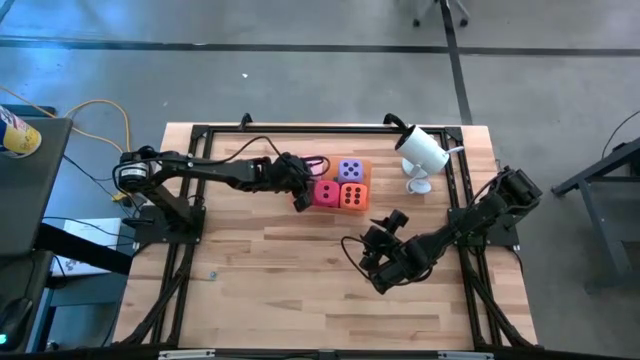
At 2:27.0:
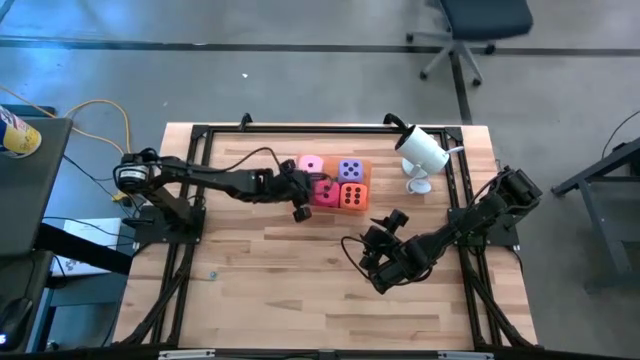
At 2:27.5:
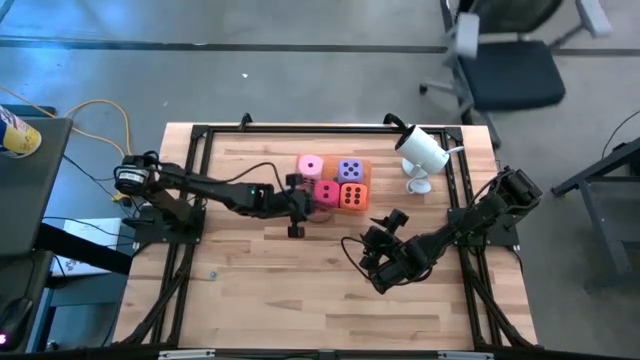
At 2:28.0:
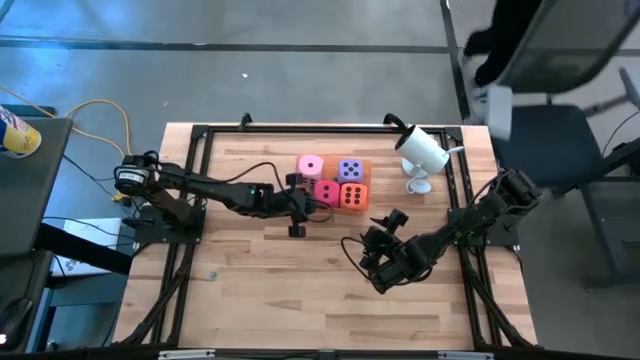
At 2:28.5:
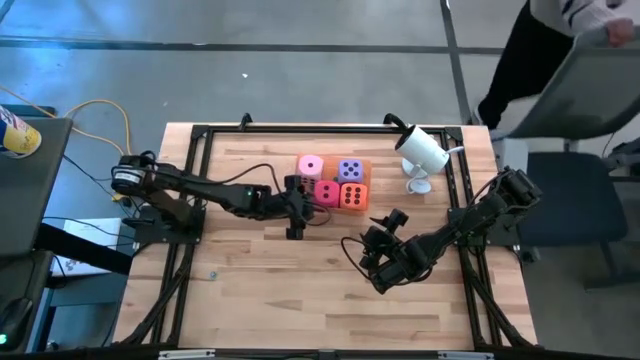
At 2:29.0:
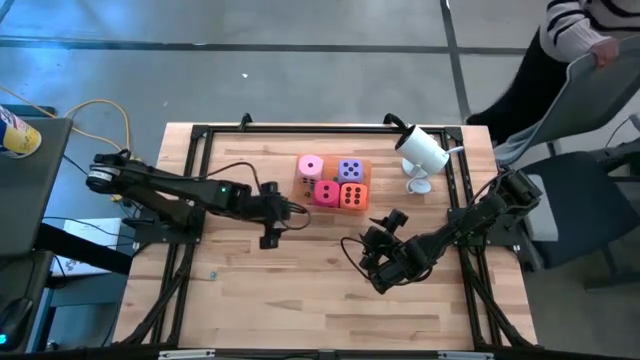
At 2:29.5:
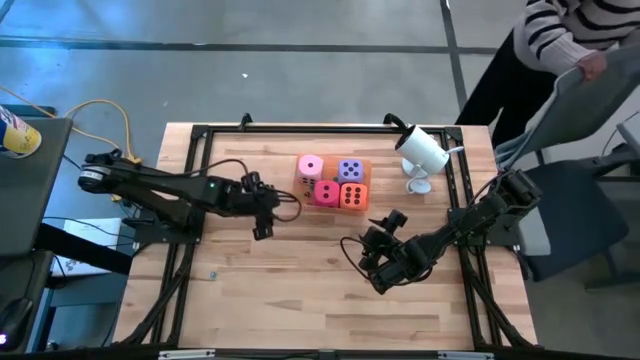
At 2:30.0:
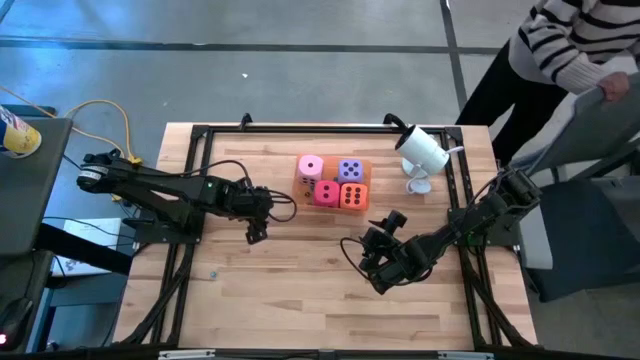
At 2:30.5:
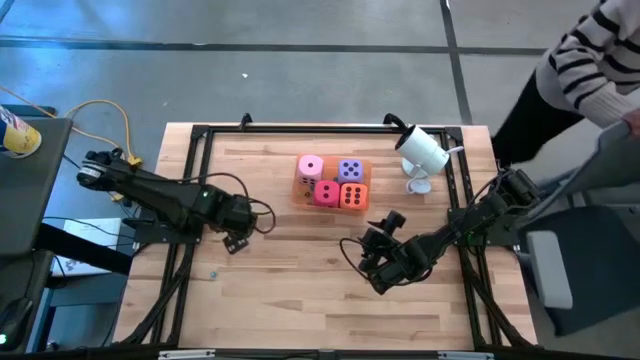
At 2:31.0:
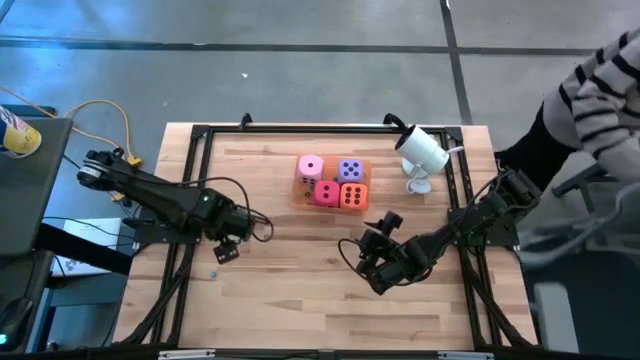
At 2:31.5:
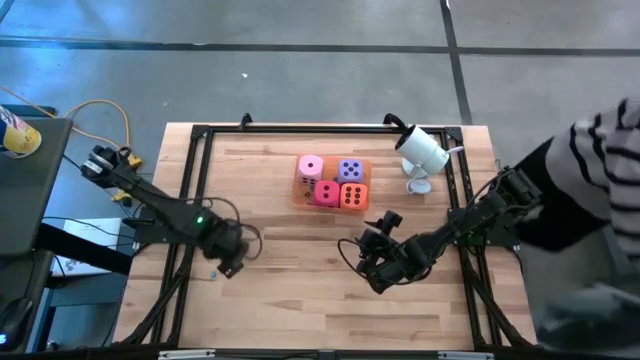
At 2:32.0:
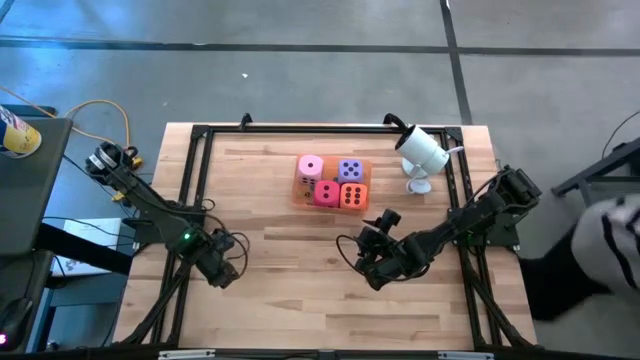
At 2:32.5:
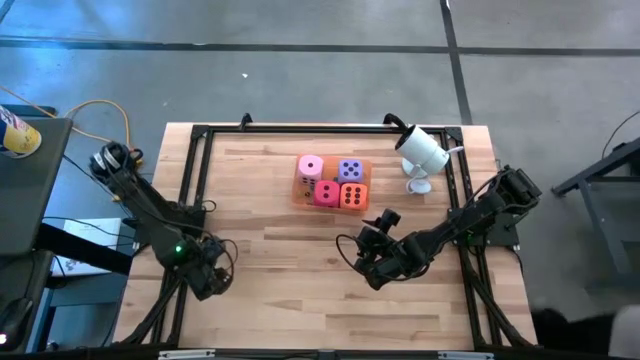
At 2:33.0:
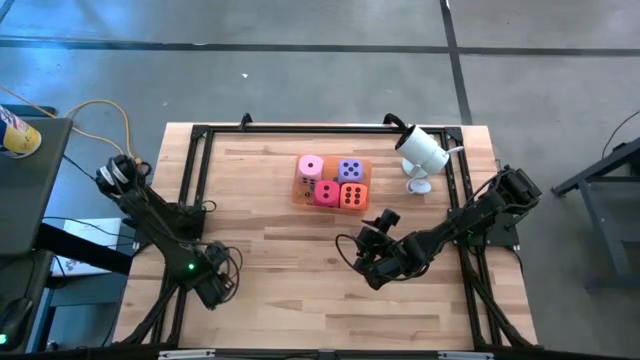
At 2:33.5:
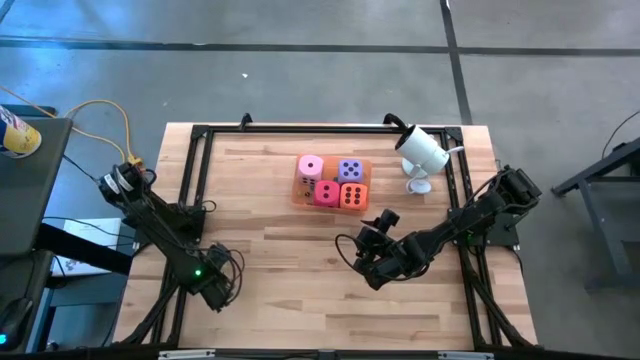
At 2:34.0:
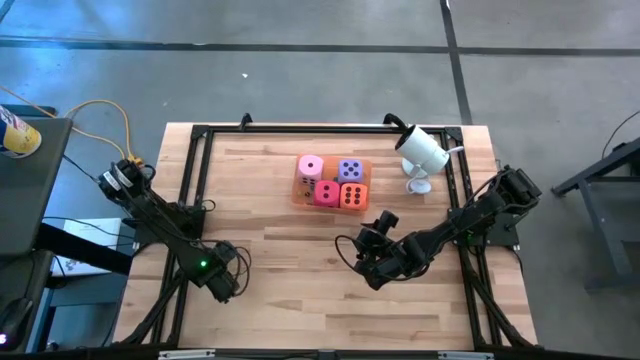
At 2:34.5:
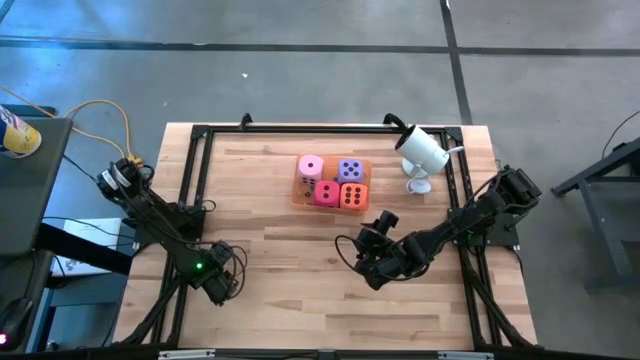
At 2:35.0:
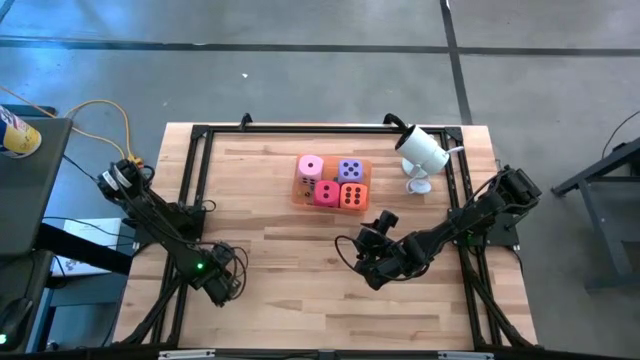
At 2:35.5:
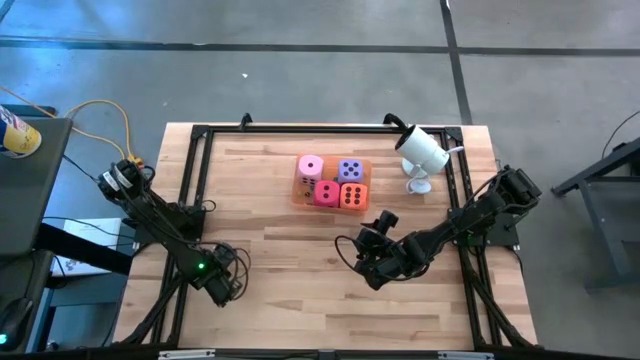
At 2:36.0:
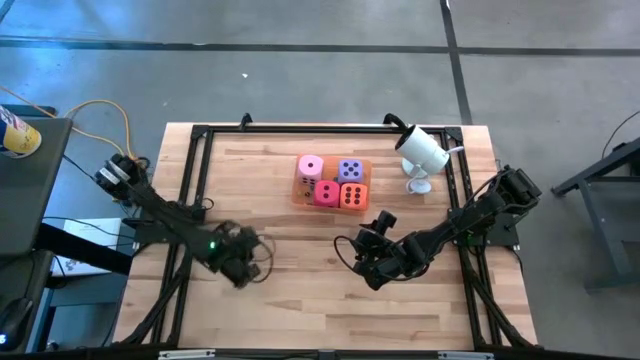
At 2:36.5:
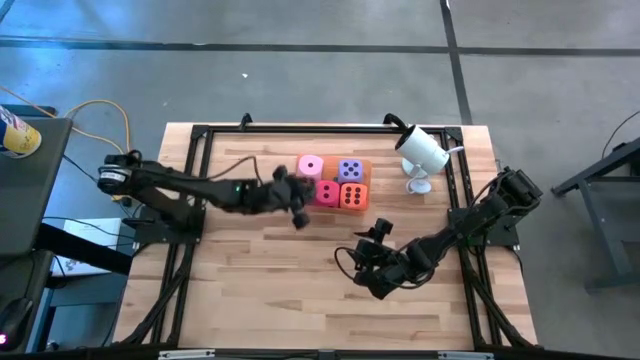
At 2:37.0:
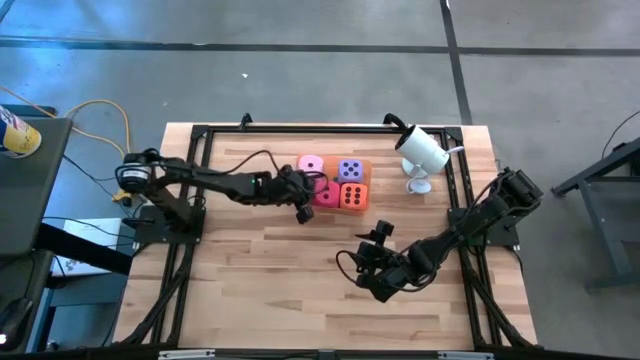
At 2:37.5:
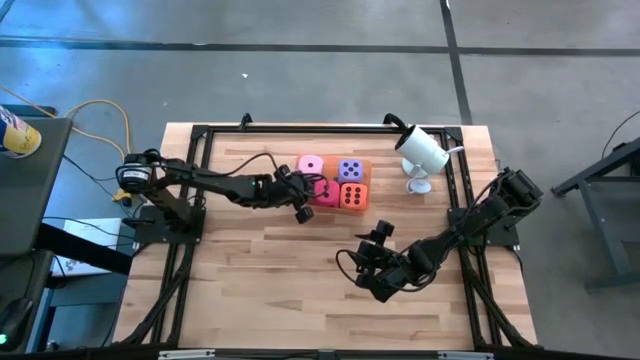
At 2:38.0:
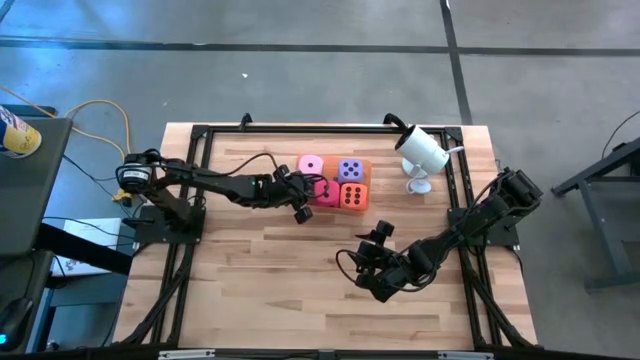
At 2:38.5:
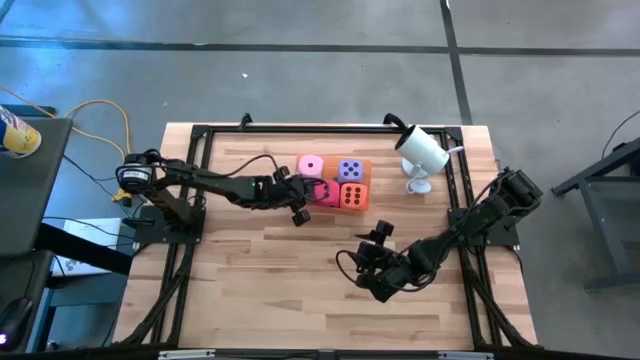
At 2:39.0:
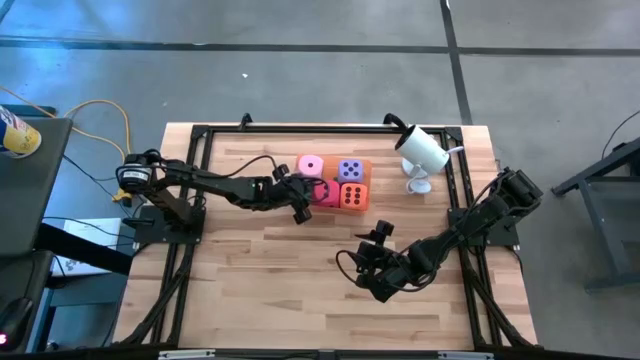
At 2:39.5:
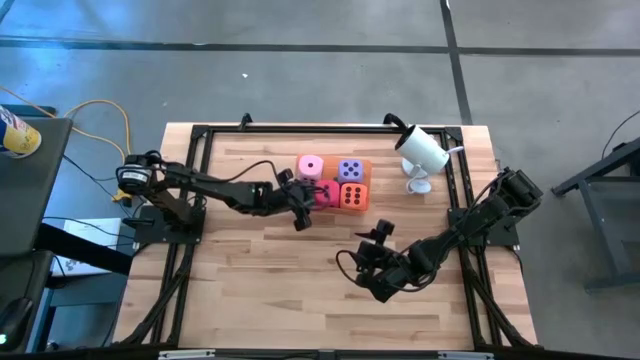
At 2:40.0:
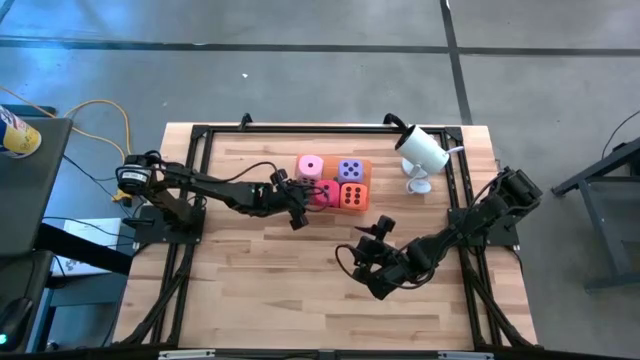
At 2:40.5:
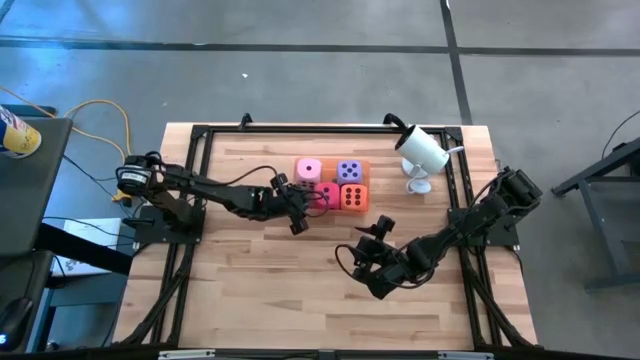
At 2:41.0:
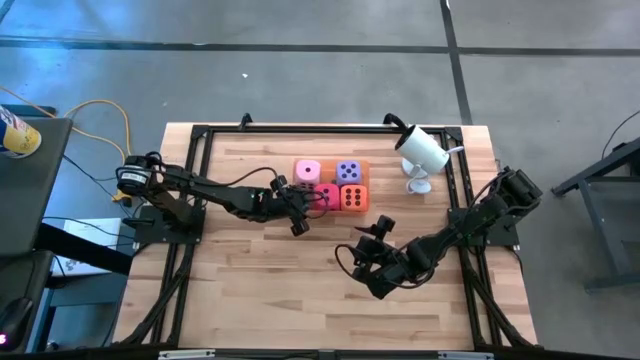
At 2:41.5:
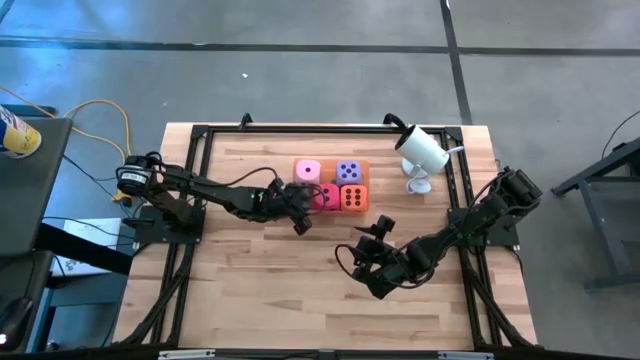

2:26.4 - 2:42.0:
Task: Pick & Place Dice
Put the small blue die into the orange bin

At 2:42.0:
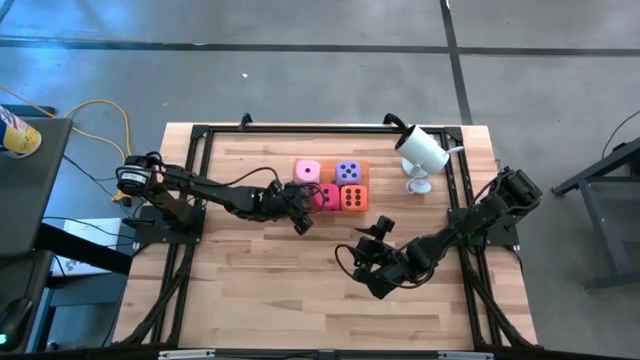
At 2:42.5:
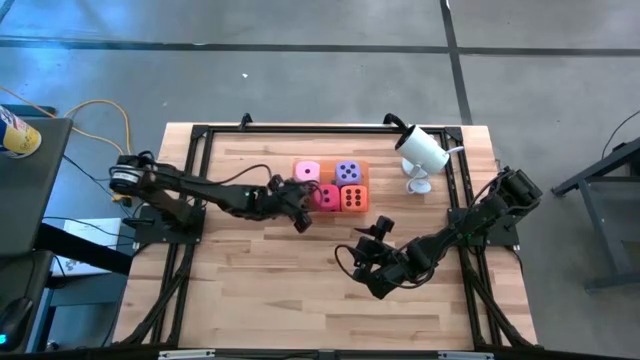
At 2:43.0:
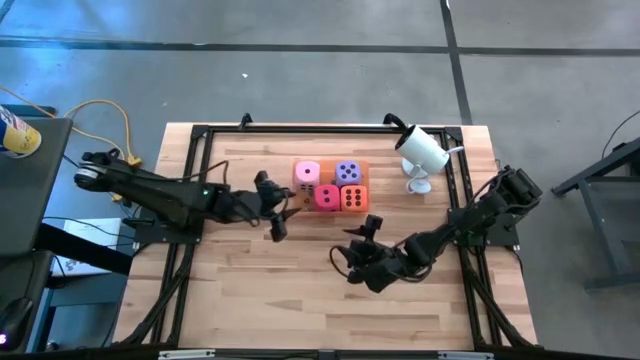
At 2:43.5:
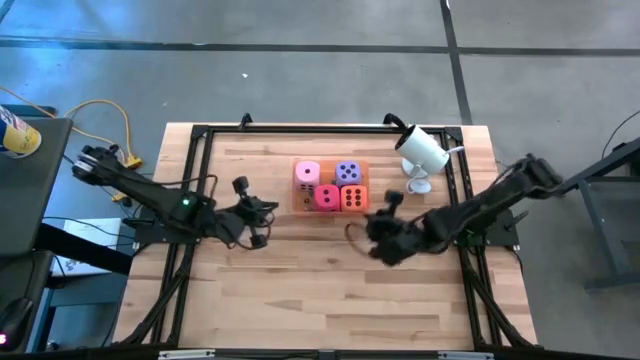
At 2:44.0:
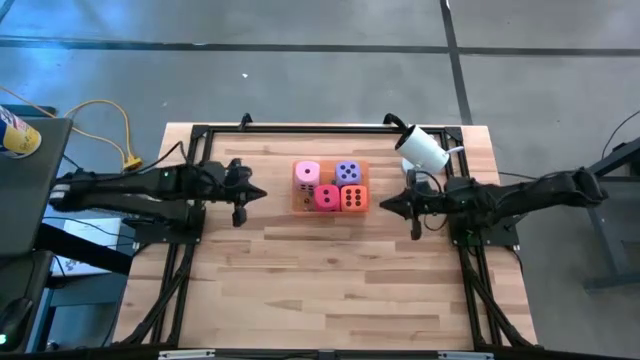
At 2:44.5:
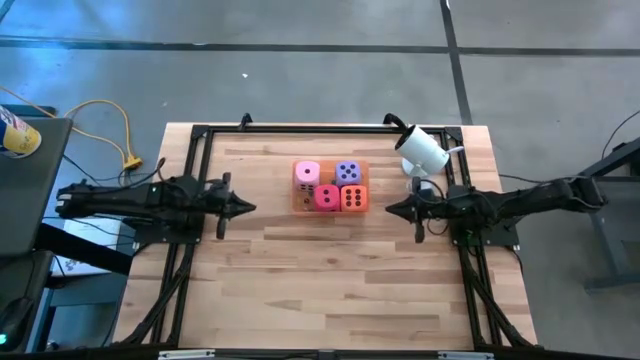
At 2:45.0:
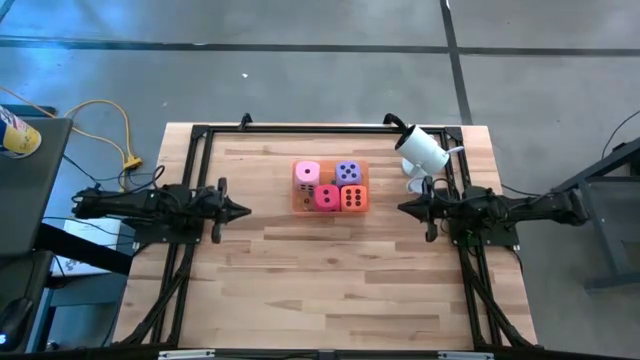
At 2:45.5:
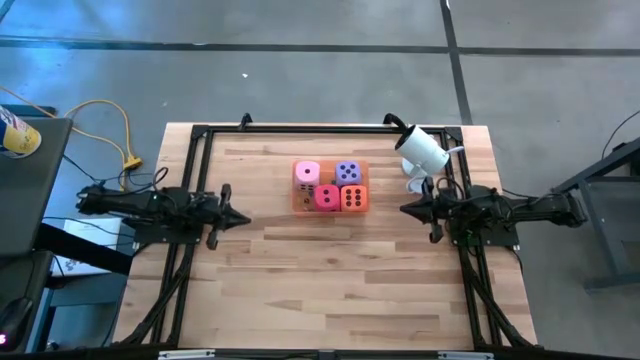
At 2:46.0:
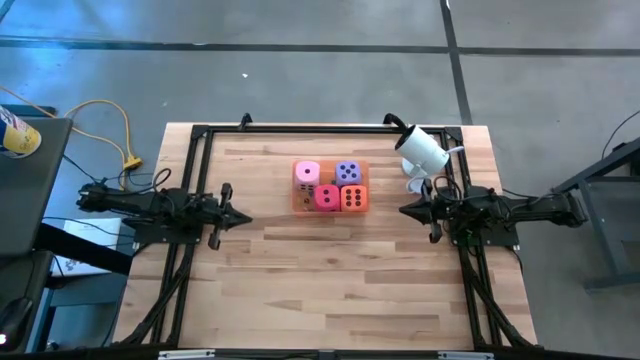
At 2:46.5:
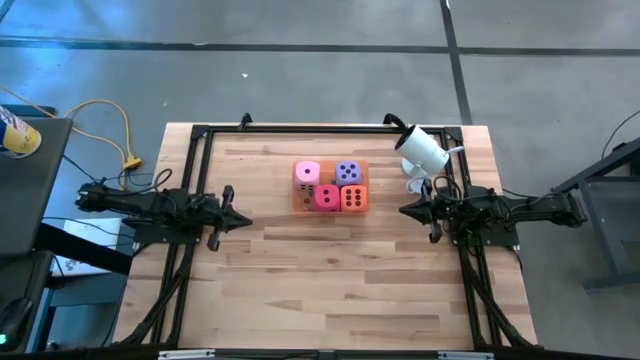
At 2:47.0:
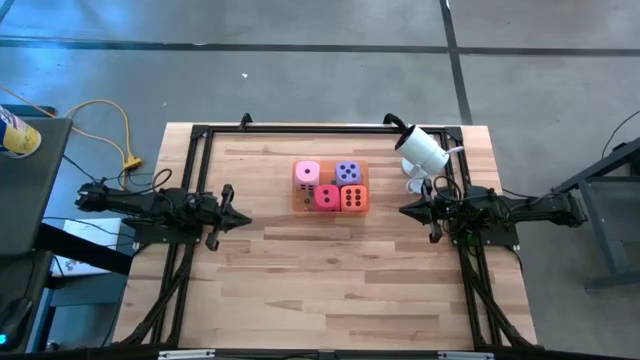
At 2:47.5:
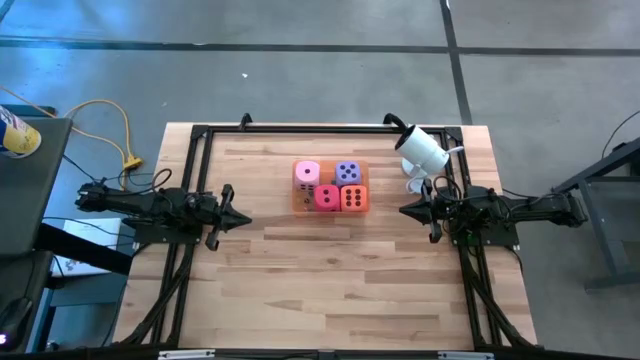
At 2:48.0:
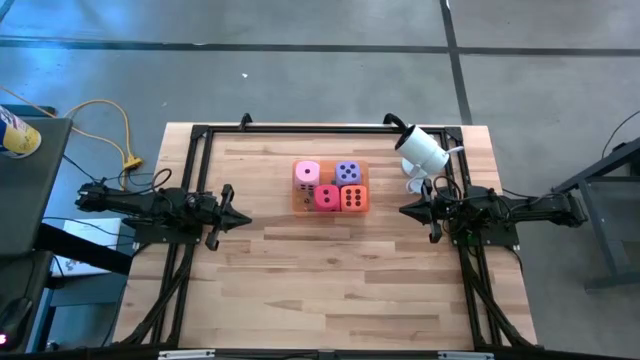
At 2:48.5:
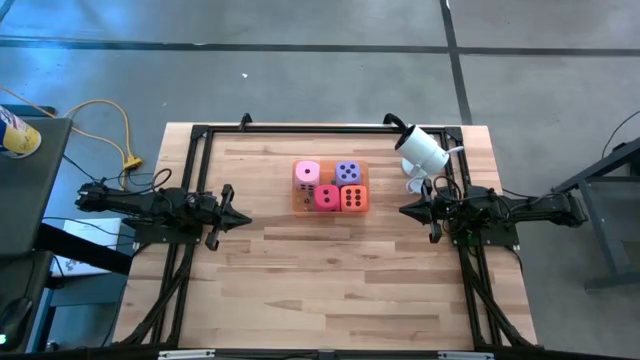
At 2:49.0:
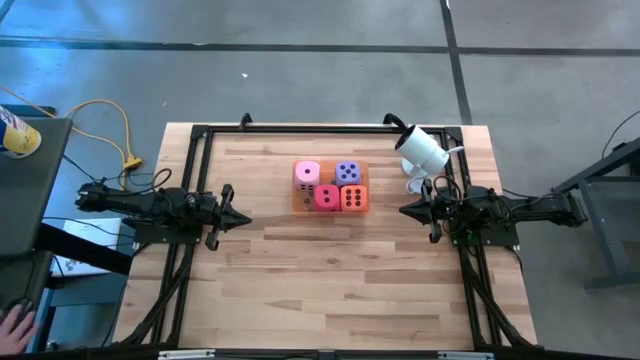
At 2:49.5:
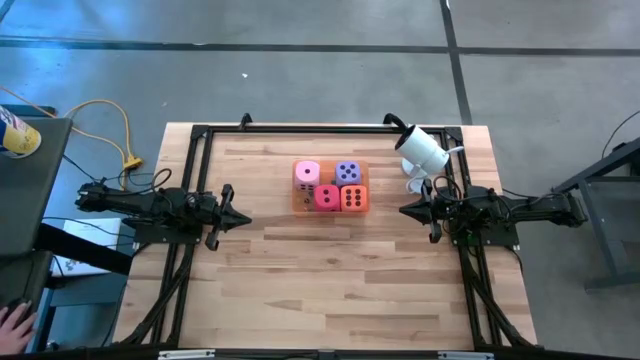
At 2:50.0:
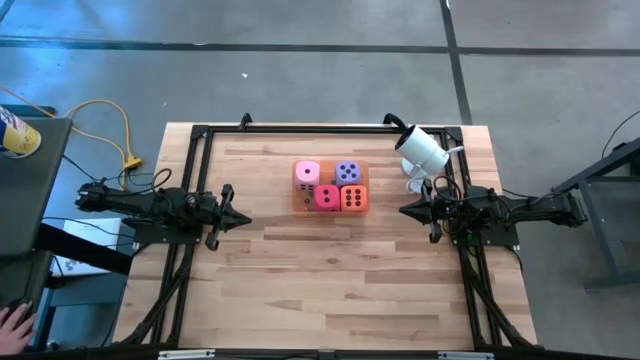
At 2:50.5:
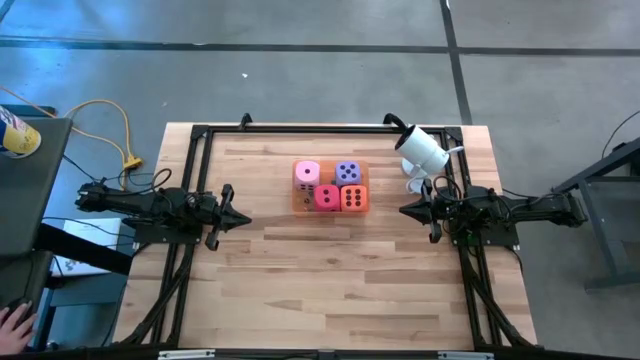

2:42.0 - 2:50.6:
Return to Home Position
